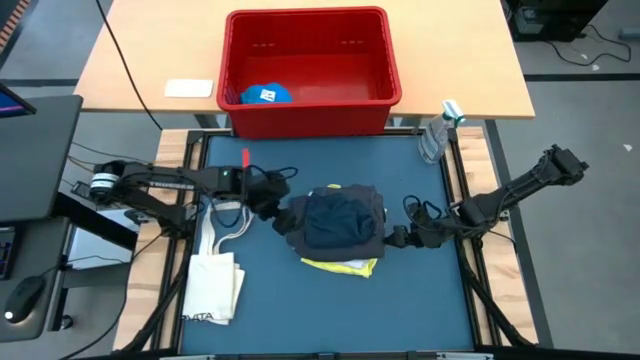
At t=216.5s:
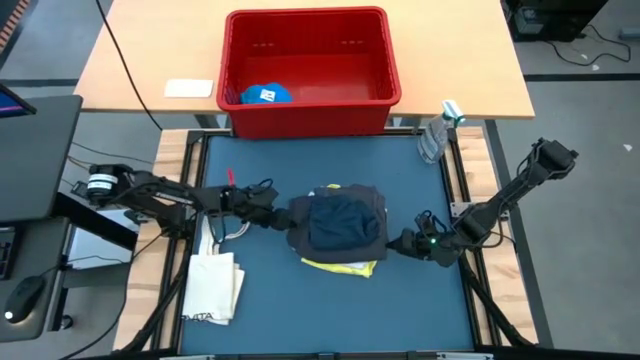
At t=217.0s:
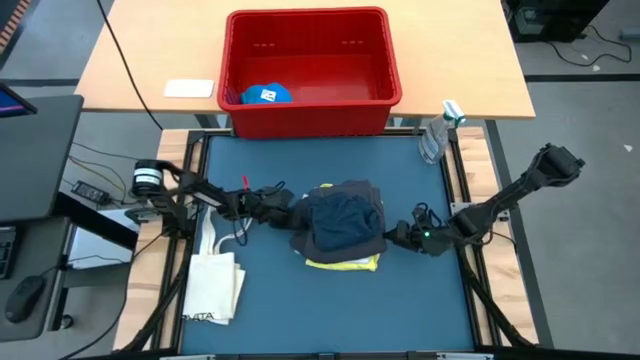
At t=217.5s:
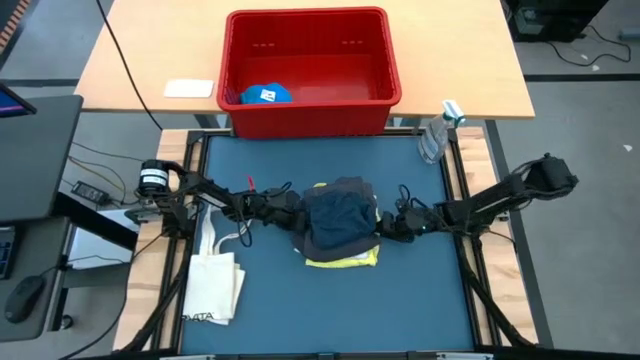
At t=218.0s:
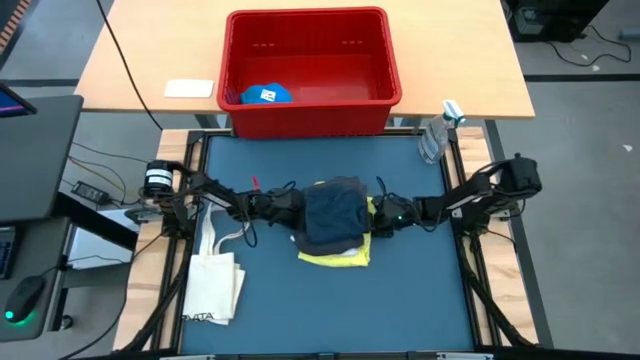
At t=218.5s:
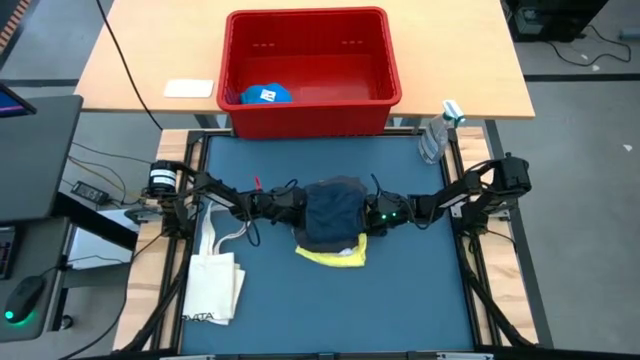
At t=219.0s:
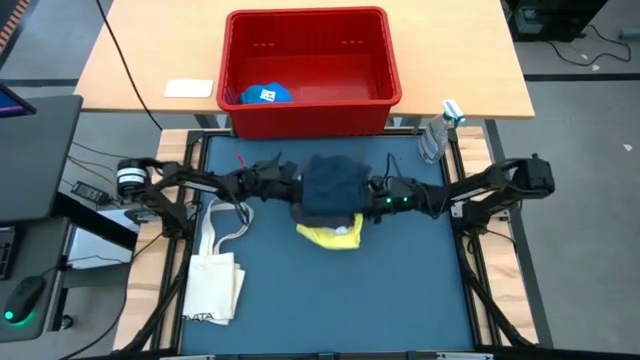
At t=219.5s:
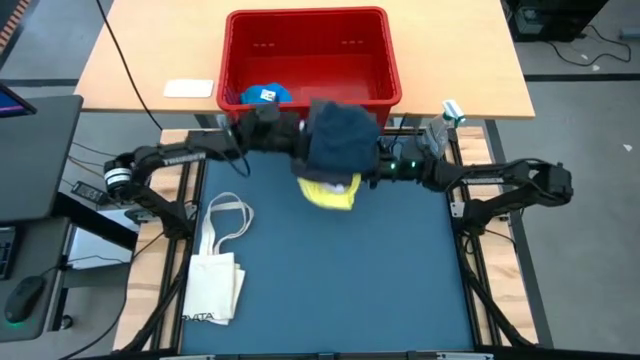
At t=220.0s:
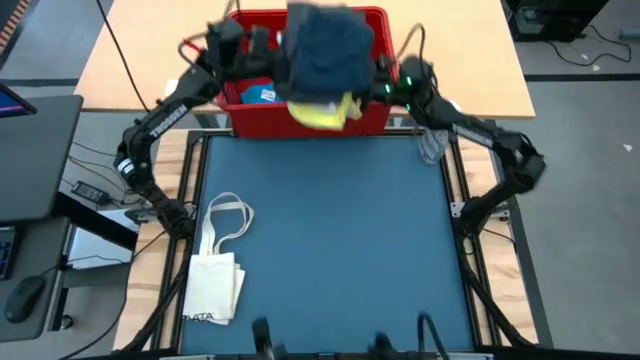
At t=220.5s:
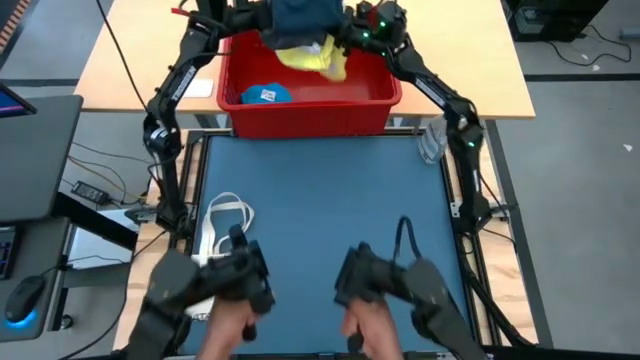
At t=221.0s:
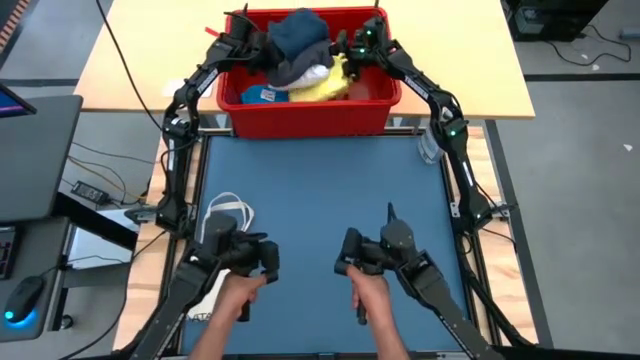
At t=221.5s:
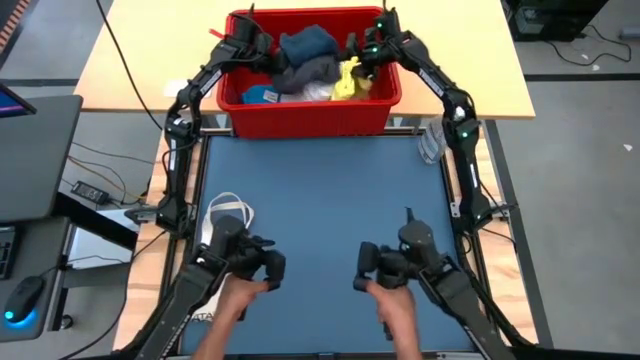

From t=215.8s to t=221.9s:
Task: Fold laundry
Put the clothes into the red bin

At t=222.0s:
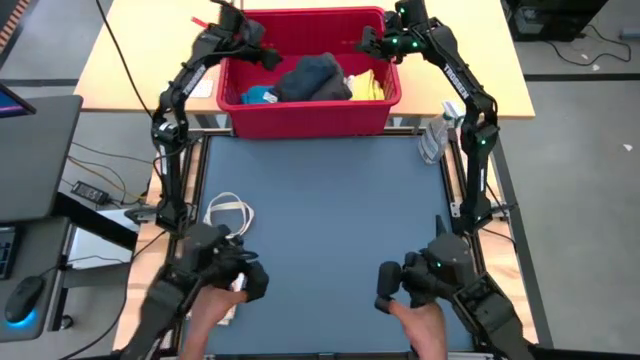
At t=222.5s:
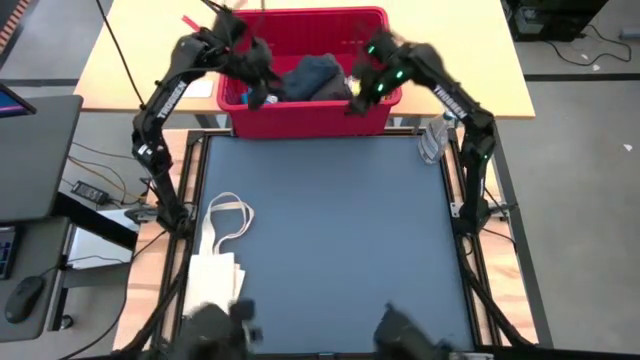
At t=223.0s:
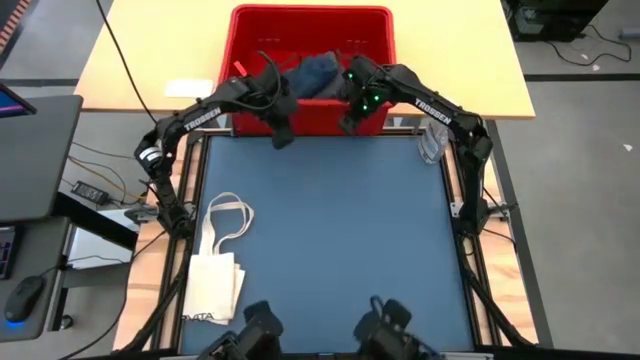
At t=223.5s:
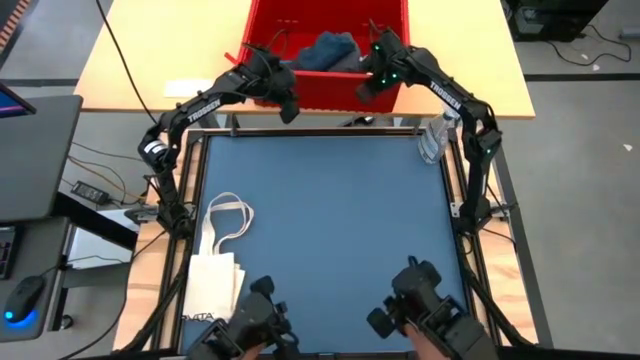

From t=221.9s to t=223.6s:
Adjust the red bin

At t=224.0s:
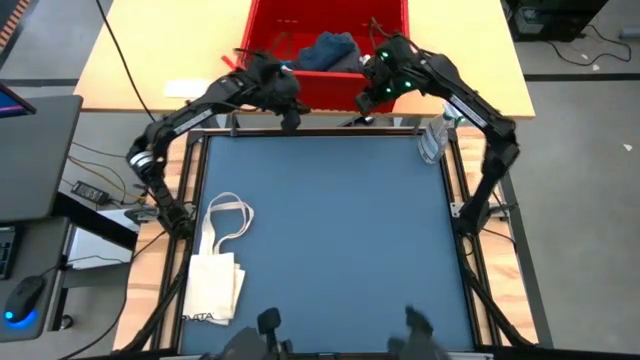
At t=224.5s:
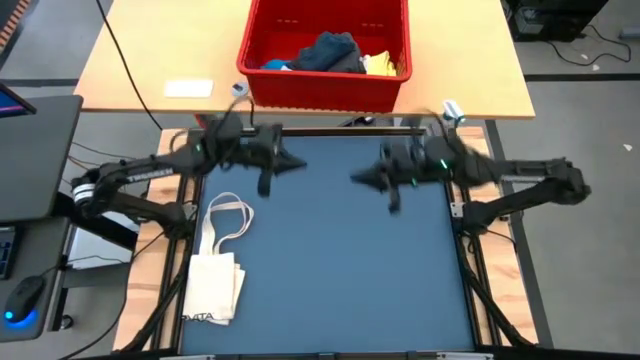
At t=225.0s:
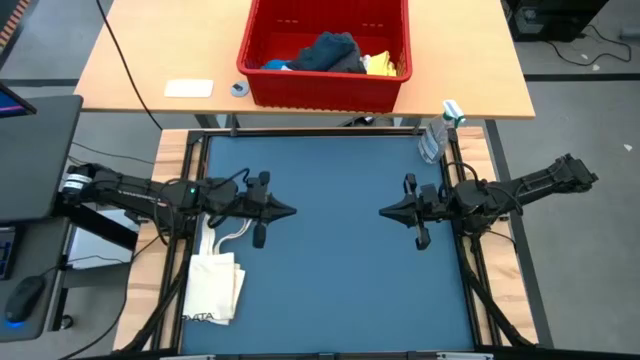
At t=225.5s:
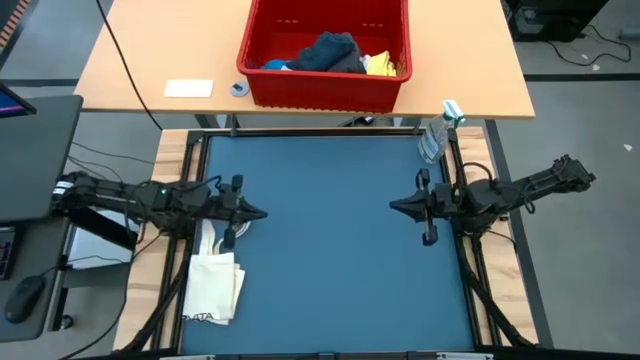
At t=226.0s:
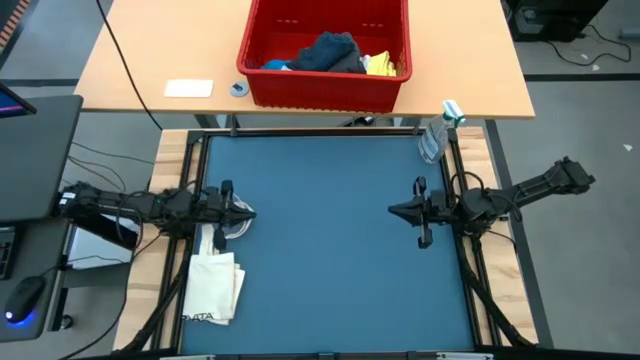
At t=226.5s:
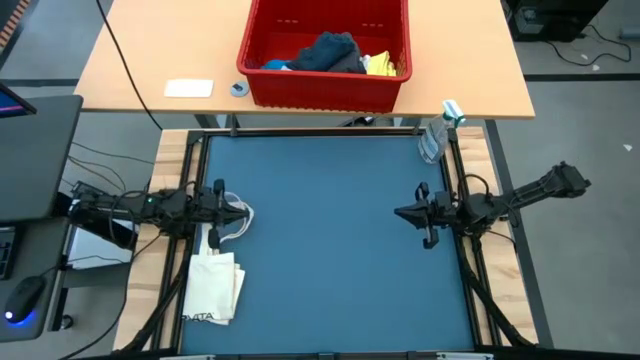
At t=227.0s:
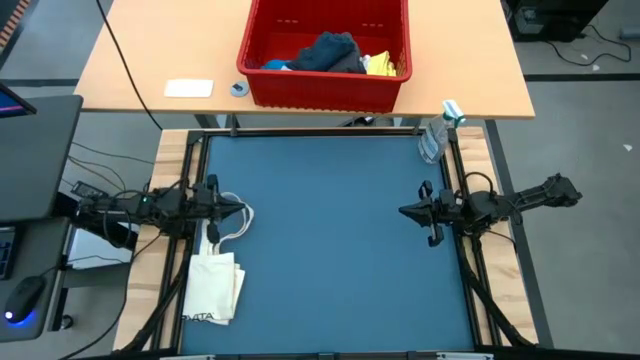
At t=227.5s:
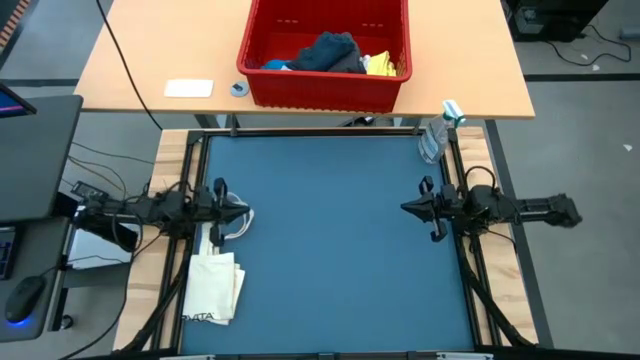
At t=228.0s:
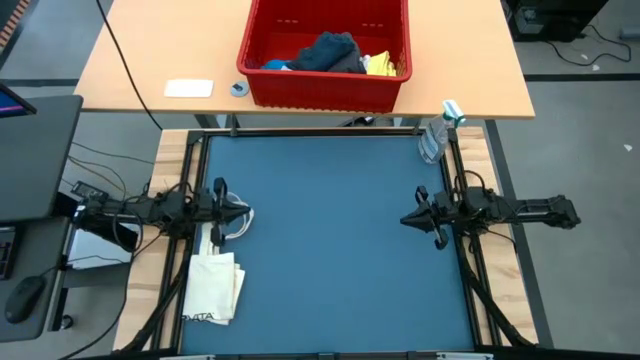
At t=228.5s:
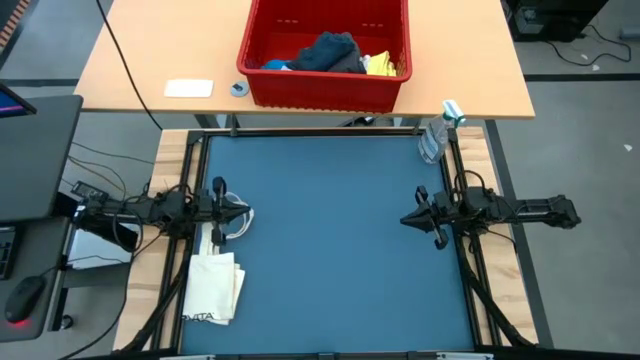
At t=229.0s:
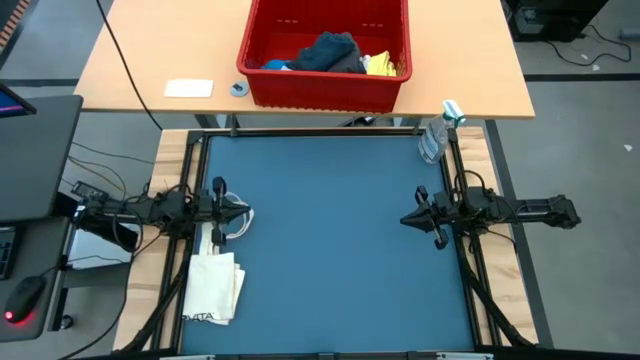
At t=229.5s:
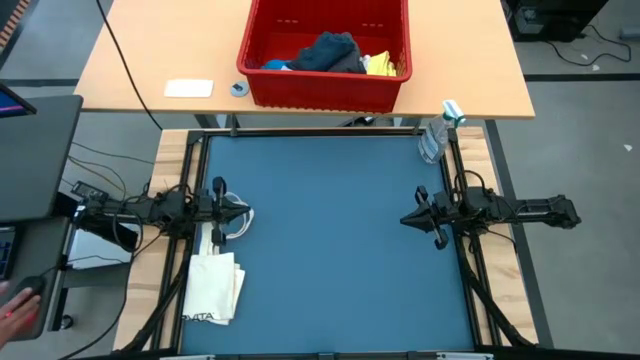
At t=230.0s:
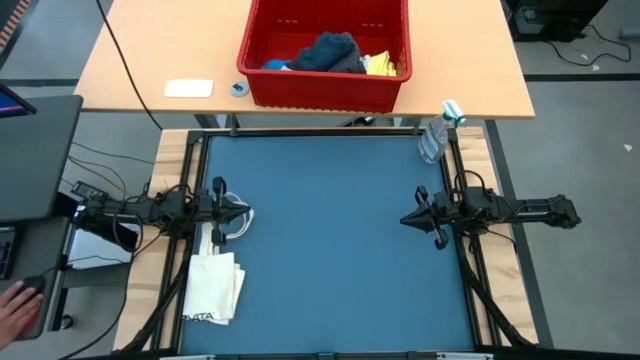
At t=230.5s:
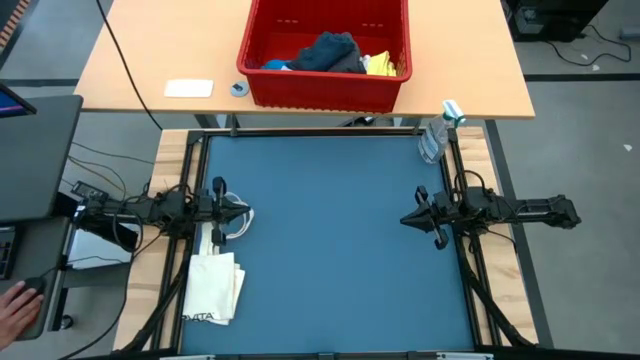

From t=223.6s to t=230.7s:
Return to Home position

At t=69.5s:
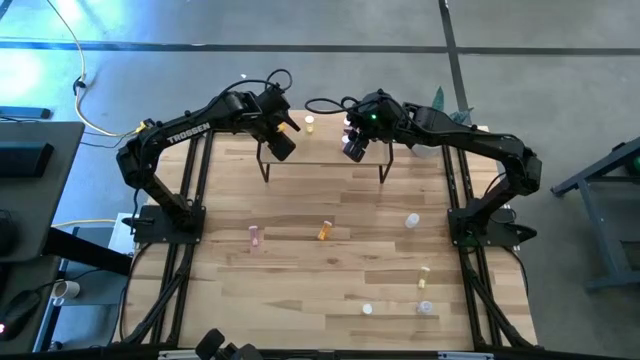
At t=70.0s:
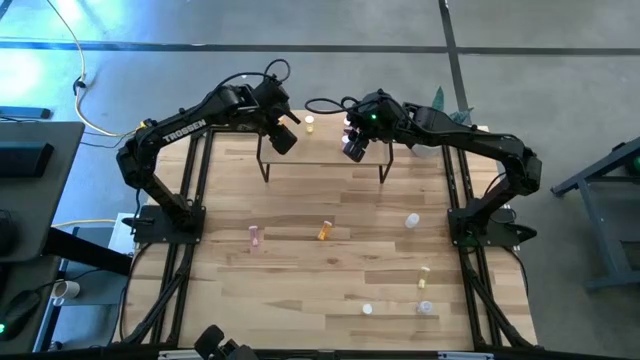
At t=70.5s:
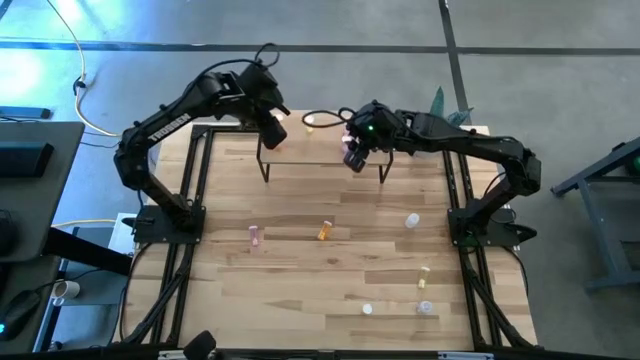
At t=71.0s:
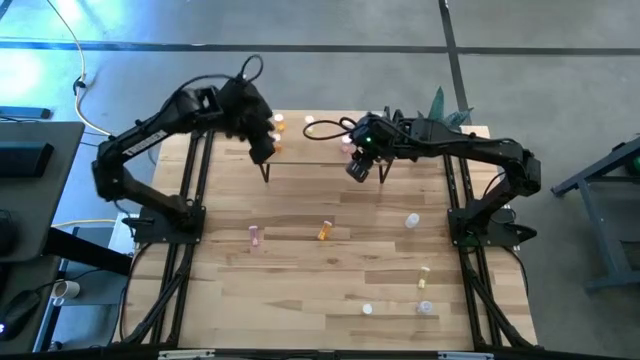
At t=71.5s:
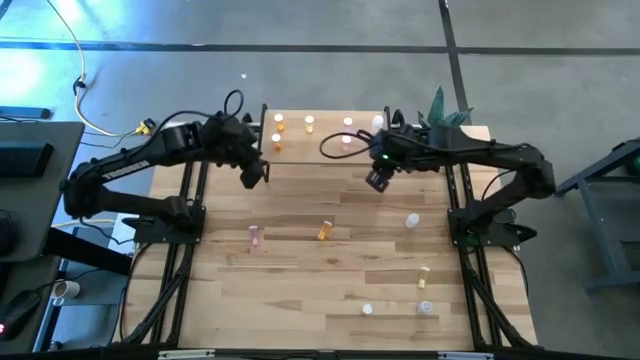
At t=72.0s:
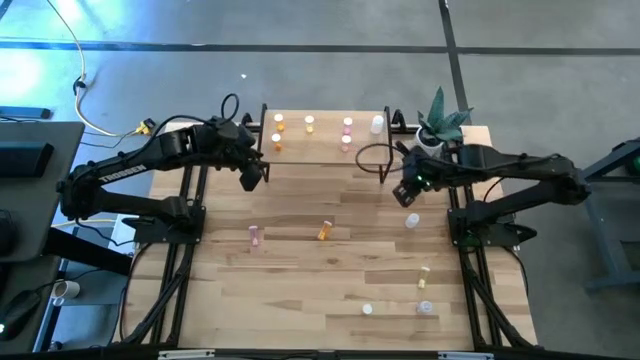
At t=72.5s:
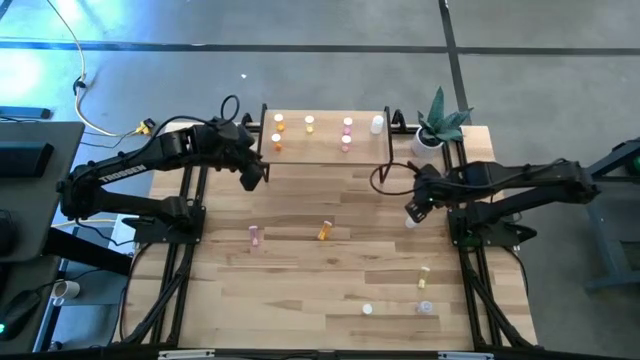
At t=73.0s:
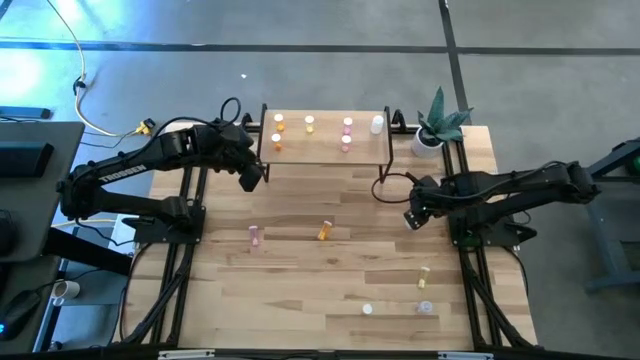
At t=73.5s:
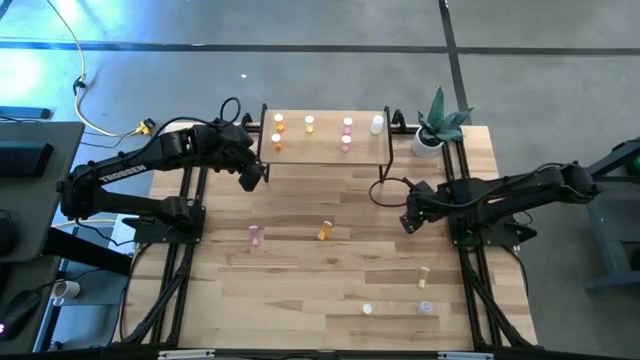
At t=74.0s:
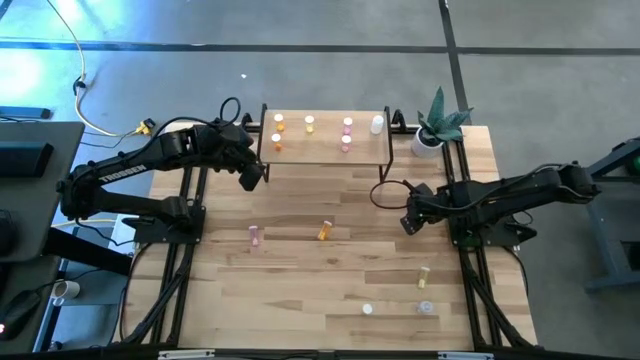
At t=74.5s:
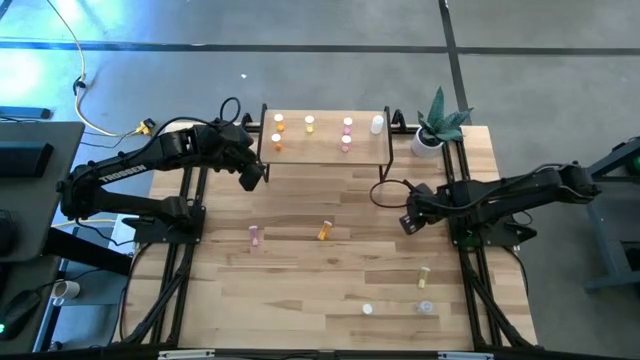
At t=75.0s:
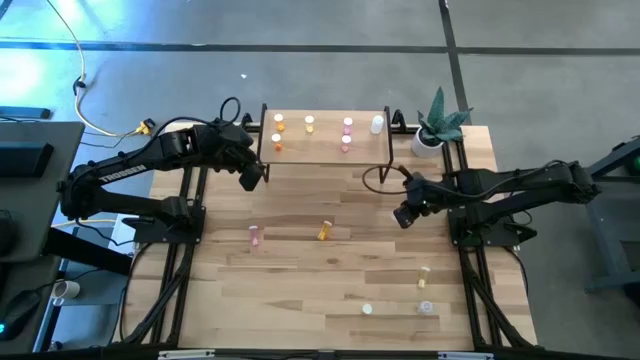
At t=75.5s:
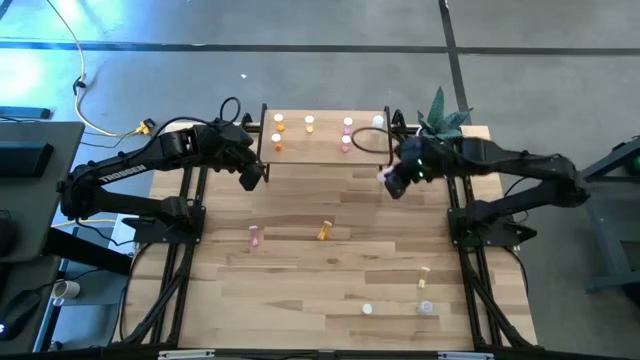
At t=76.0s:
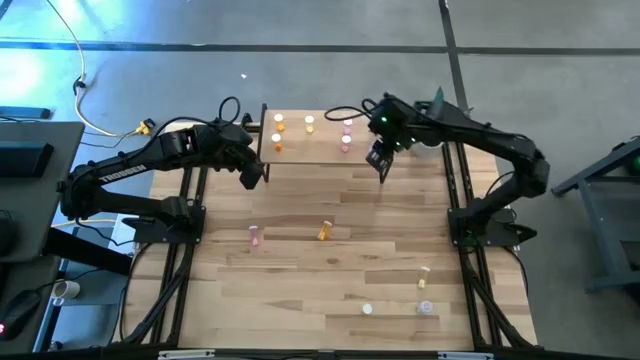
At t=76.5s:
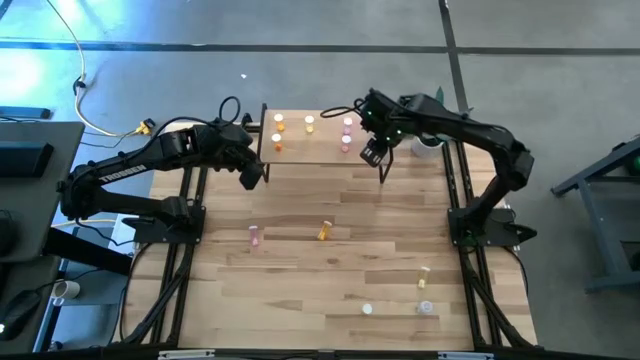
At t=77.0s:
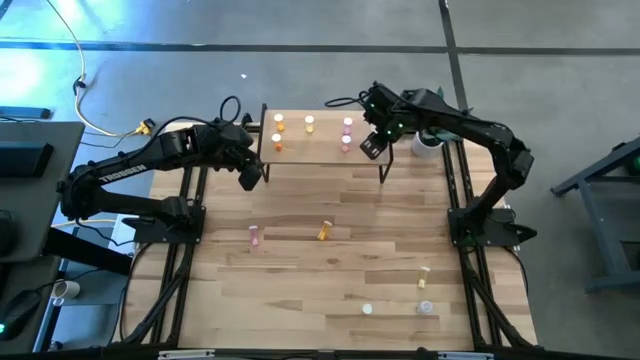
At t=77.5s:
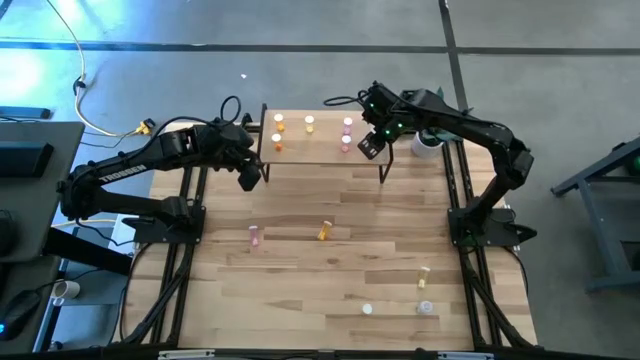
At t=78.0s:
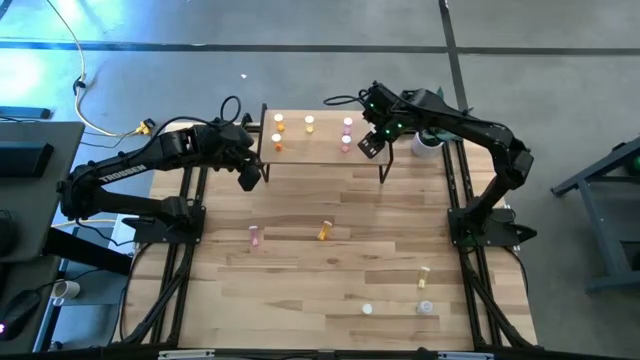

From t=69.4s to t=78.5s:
Task: Pick and place medicine bottles onto shelf by color
Put the top white pill bottle on the shelf aligned with other white pill bottle
